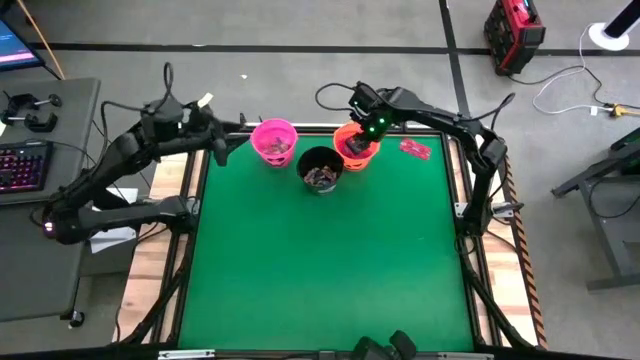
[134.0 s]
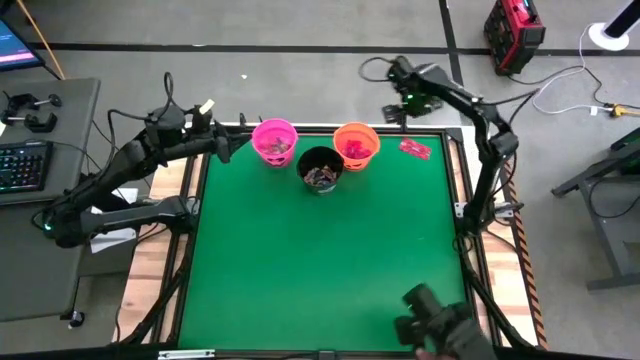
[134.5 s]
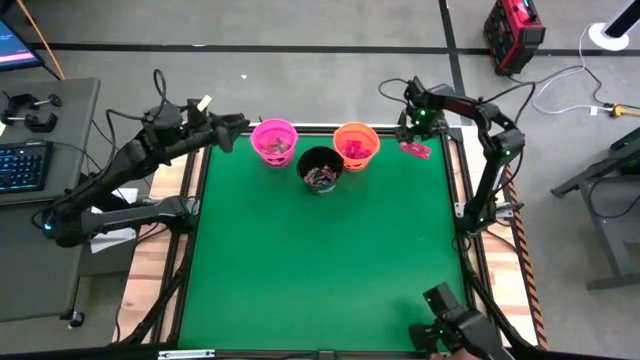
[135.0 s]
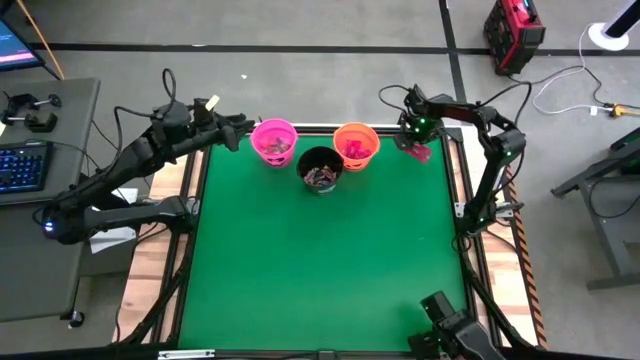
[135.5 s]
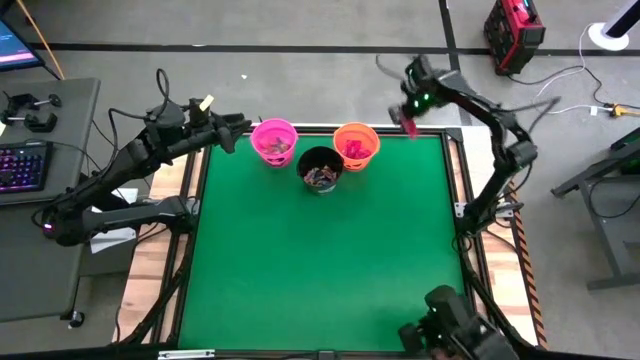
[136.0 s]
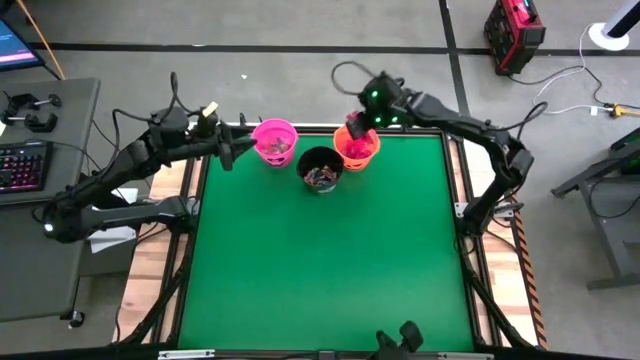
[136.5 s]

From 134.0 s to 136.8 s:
Task: Sort candy by brand, put in halloween buckets
Put the red candy packet into the orange bucket

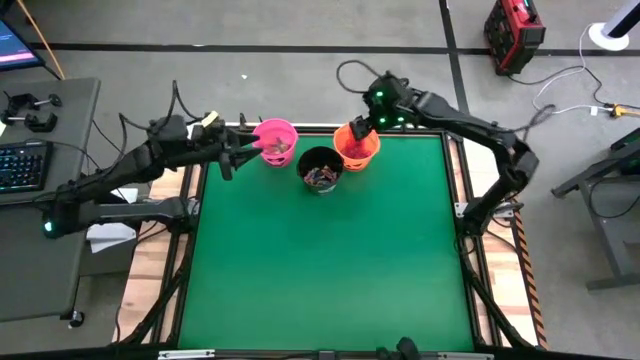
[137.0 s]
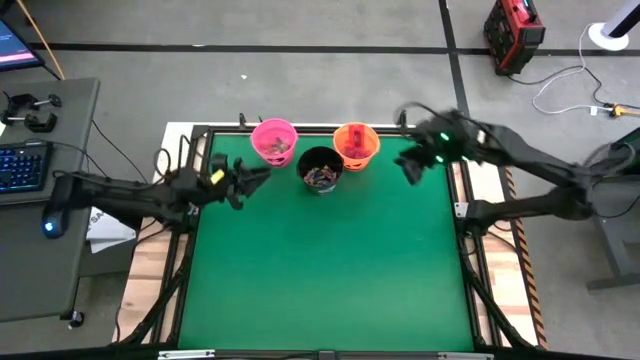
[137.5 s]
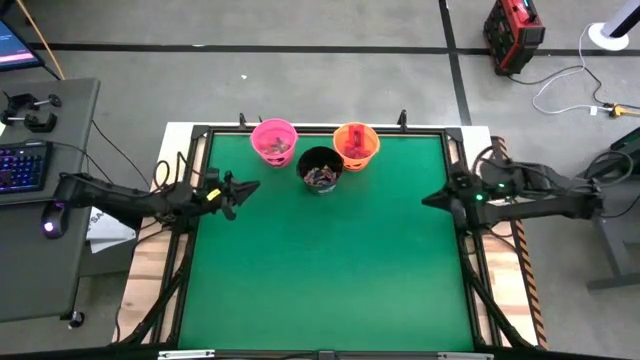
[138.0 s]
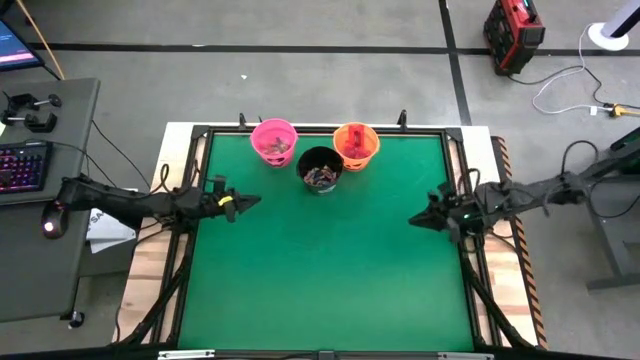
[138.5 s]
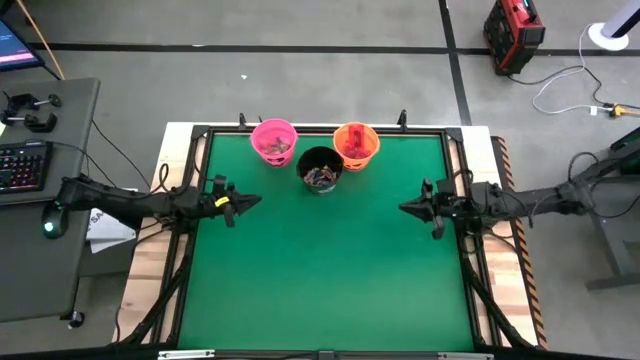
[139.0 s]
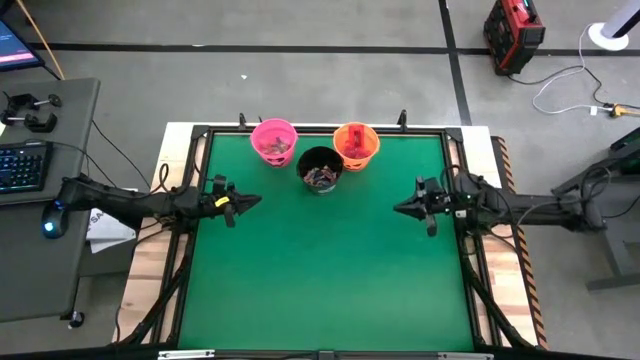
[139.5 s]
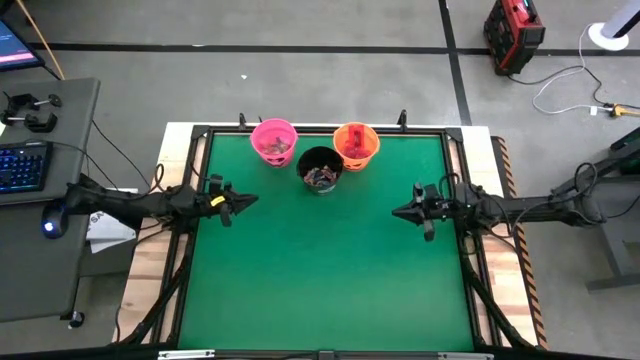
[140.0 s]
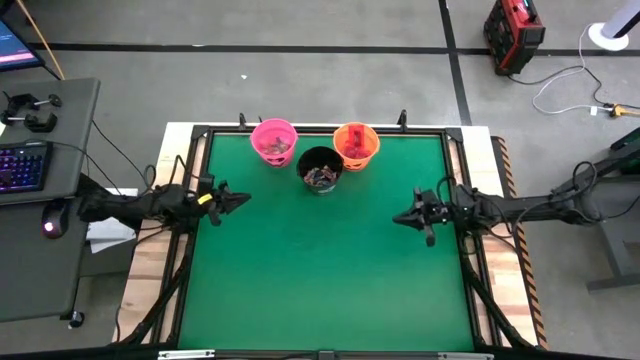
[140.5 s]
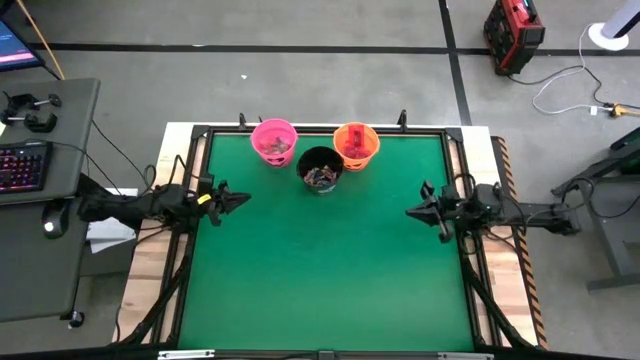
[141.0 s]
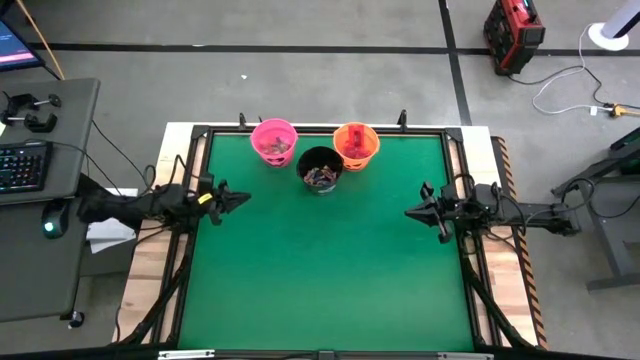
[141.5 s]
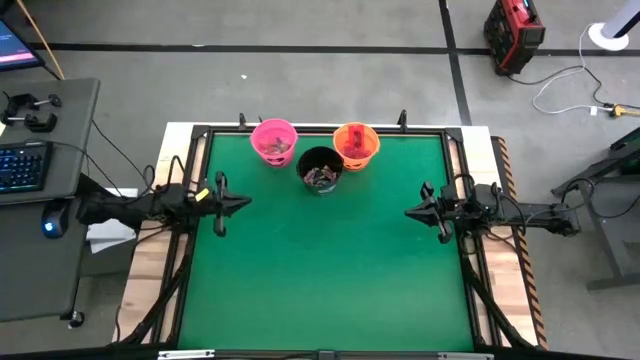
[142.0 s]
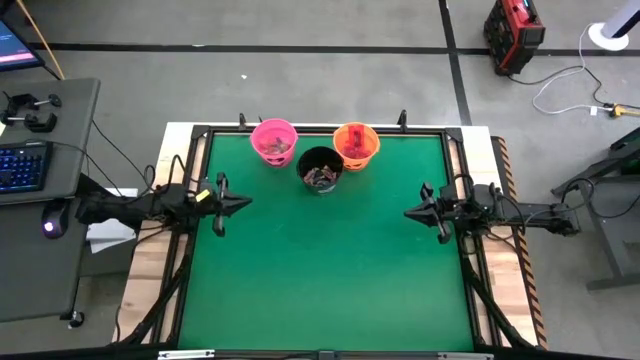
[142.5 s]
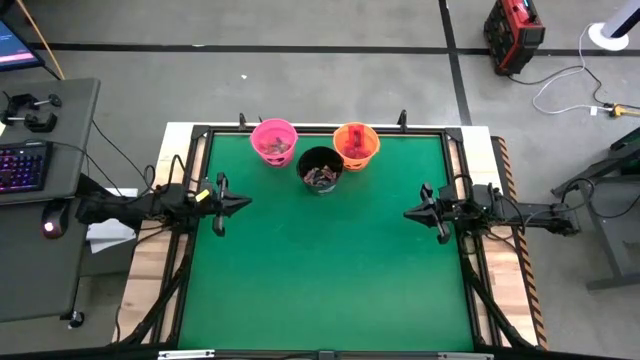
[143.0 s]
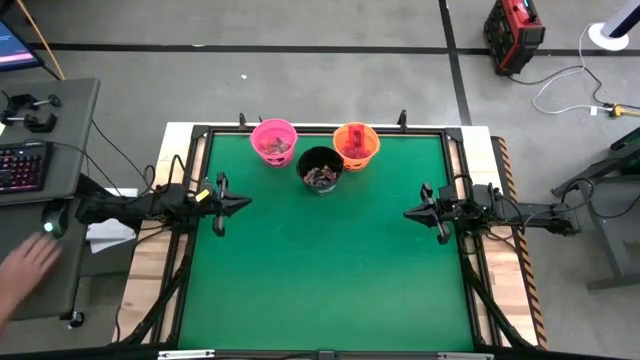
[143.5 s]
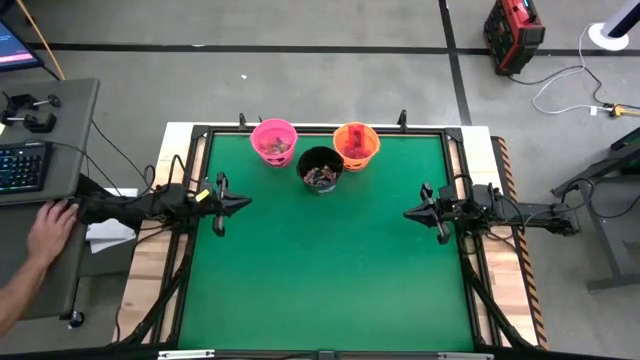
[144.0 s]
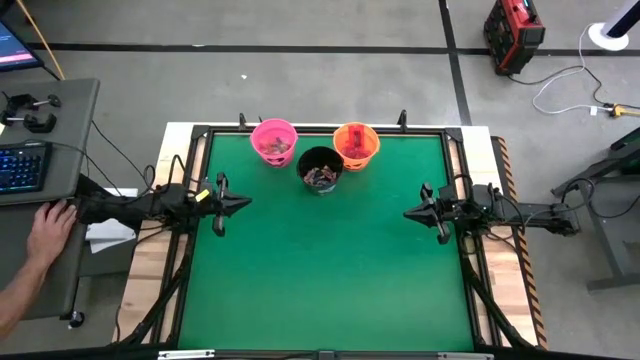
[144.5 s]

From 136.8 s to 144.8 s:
Return to Home Position

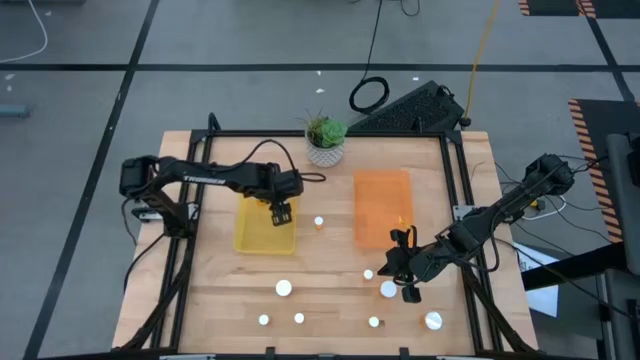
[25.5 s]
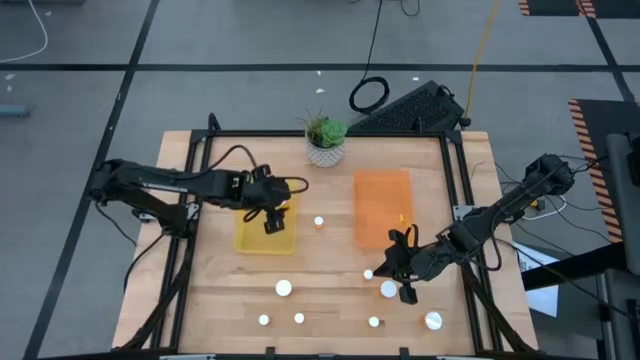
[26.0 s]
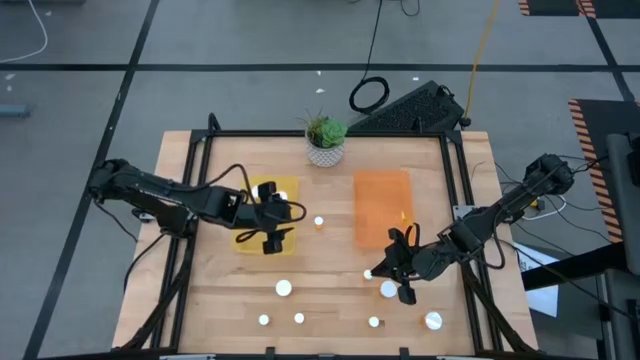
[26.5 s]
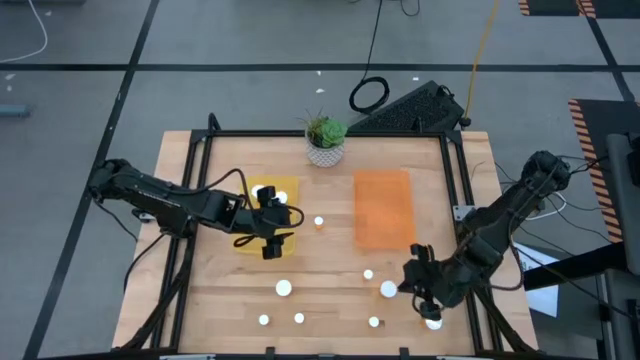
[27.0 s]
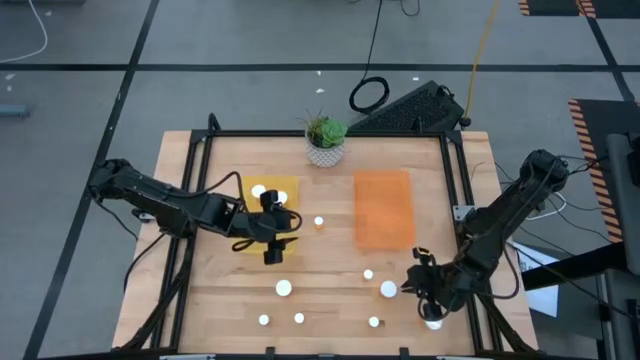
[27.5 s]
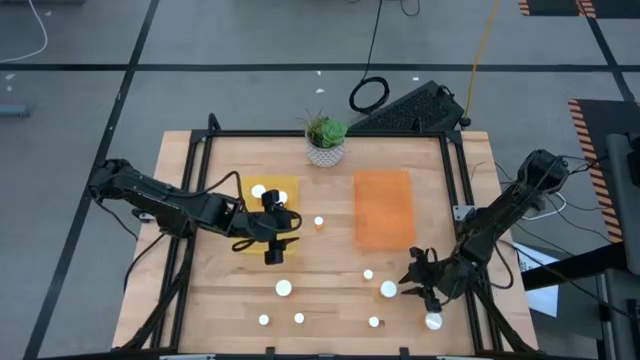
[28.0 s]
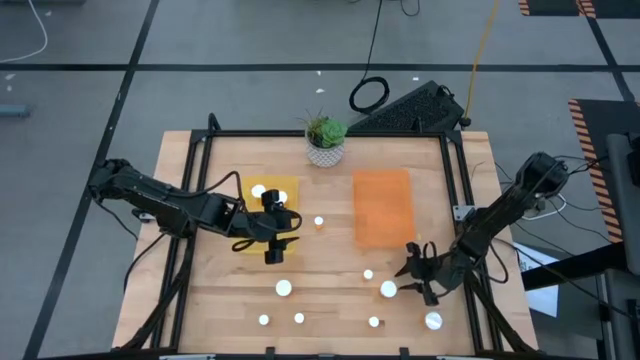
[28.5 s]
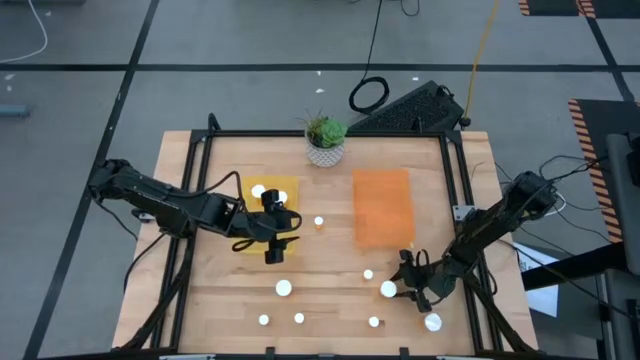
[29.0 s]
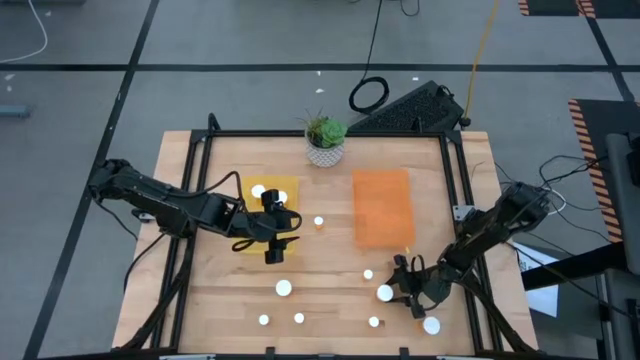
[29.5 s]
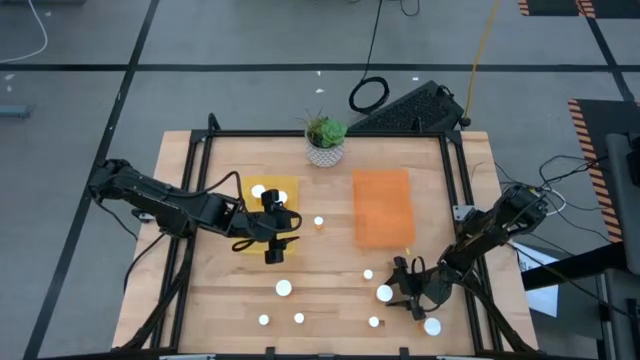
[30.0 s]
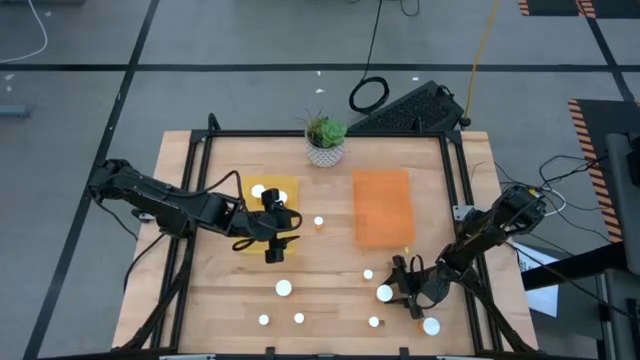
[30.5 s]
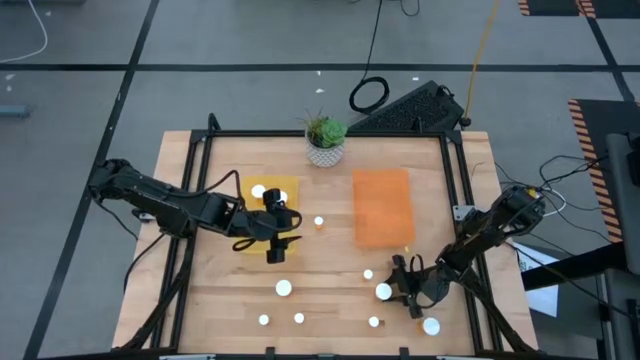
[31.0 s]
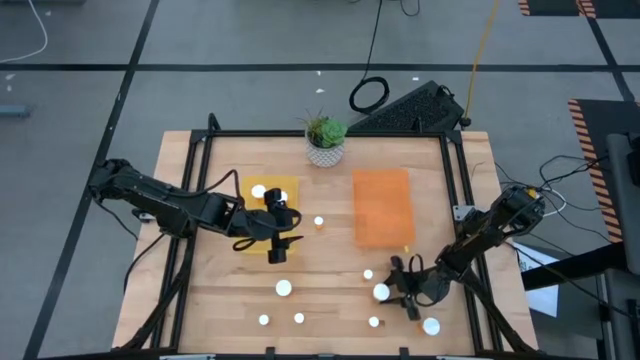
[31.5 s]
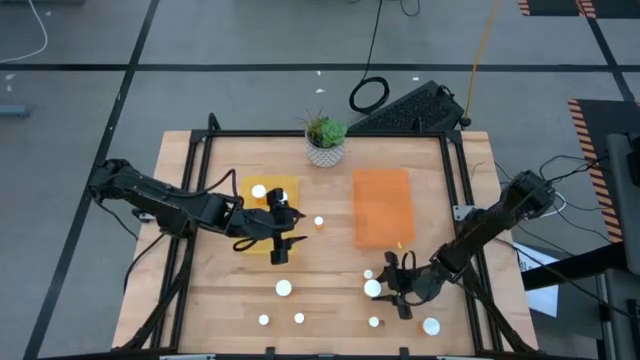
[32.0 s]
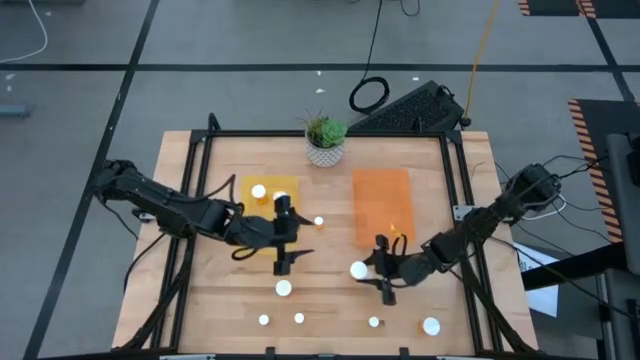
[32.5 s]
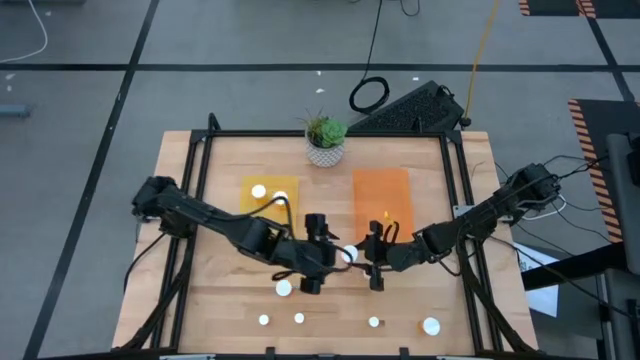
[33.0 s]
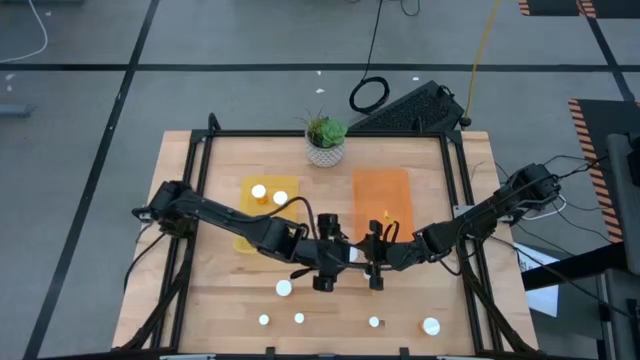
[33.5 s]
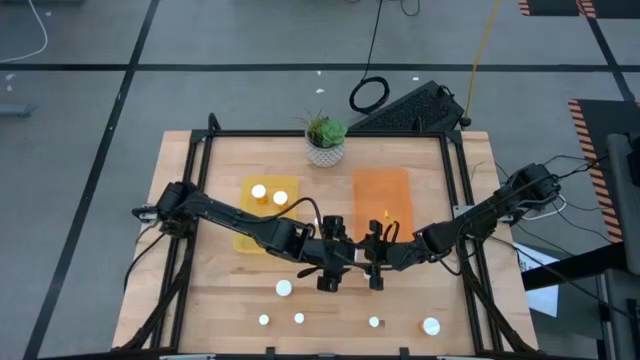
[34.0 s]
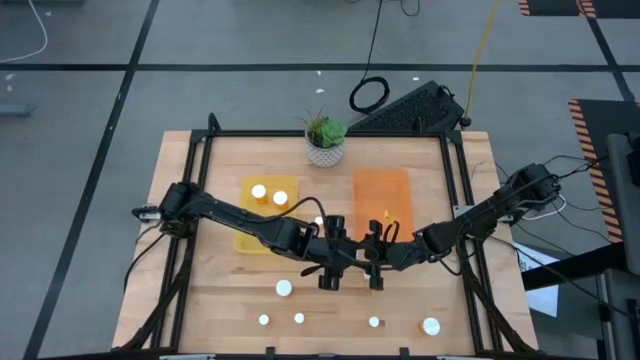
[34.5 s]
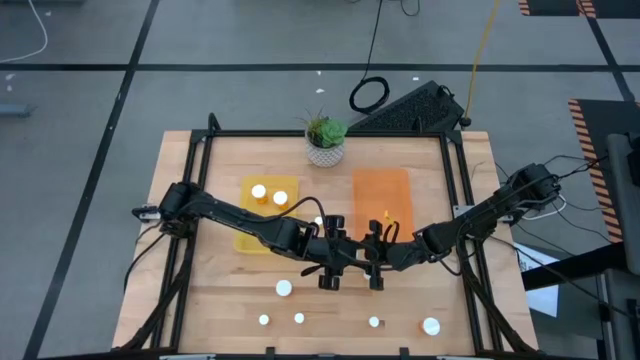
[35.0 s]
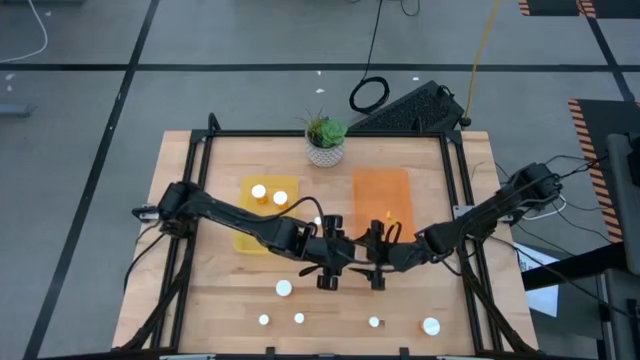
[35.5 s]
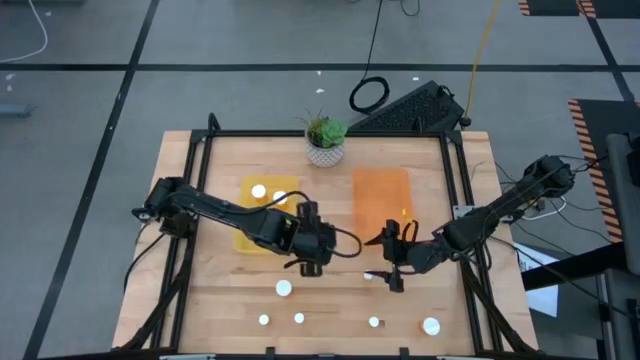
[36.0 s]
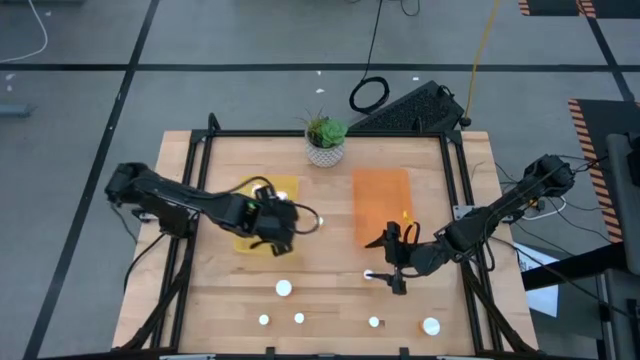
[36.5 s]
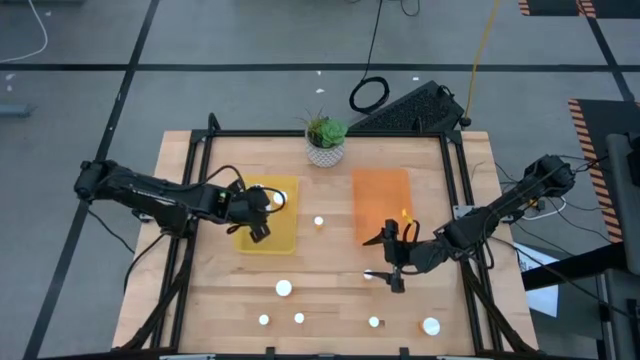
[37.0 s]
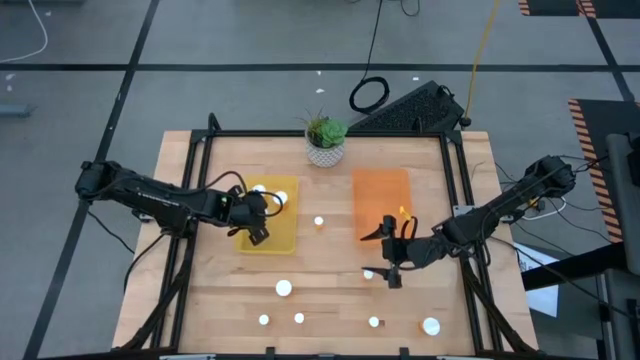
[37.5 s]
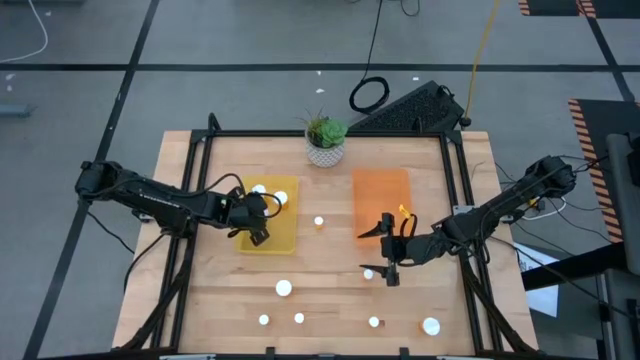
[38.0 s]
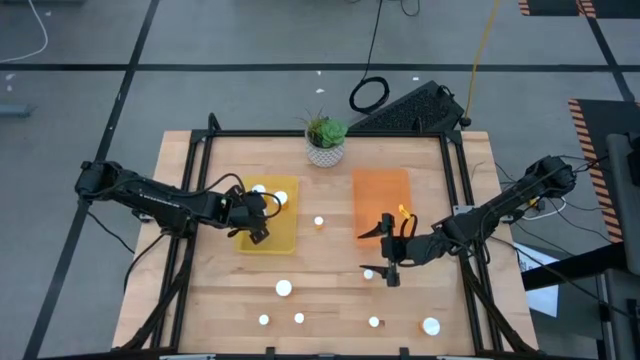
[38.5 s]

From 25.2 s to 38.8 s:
Task: Pick and place medicine bottles into bin by pill shape (circle, oval)
Put the large medicine bottle into the yellow bin
